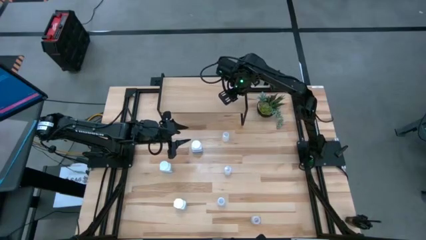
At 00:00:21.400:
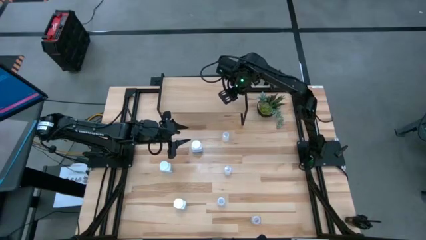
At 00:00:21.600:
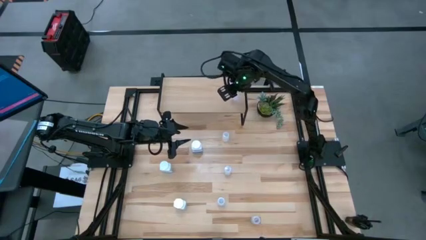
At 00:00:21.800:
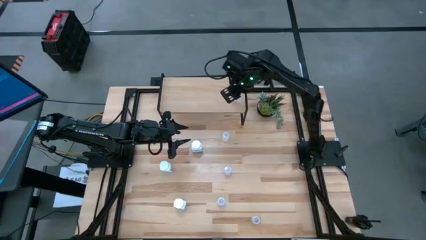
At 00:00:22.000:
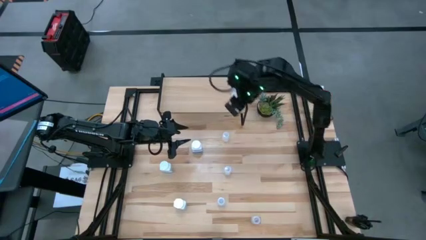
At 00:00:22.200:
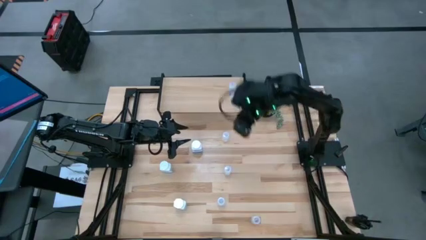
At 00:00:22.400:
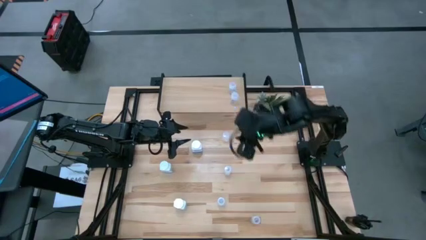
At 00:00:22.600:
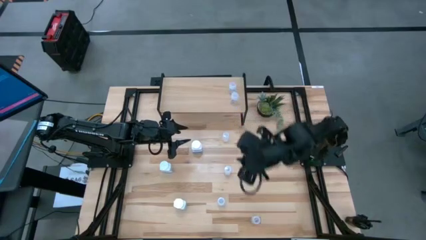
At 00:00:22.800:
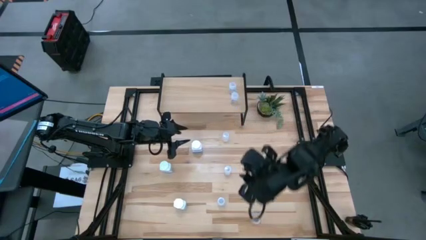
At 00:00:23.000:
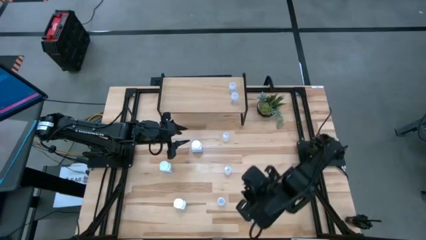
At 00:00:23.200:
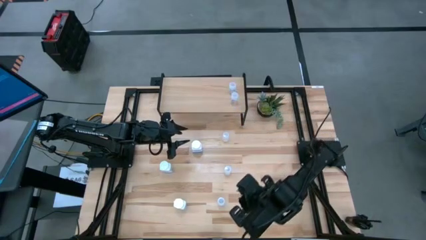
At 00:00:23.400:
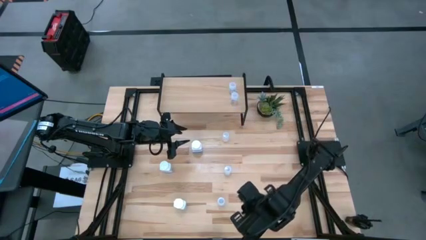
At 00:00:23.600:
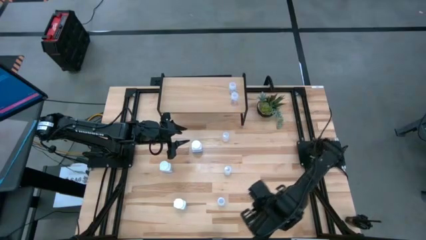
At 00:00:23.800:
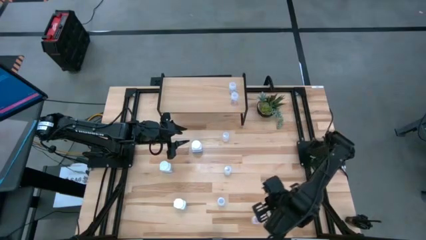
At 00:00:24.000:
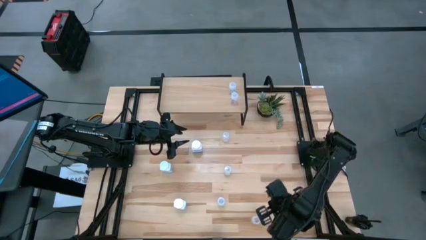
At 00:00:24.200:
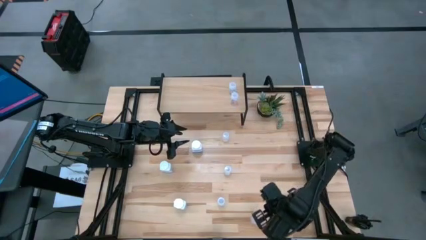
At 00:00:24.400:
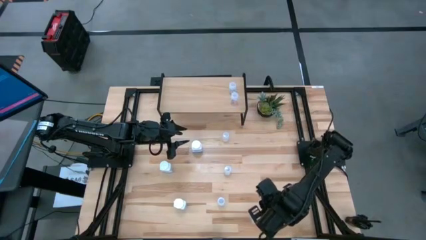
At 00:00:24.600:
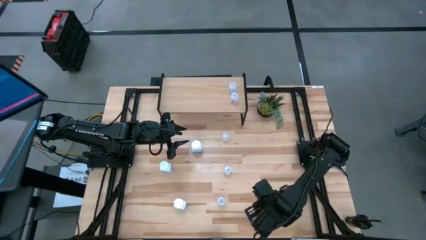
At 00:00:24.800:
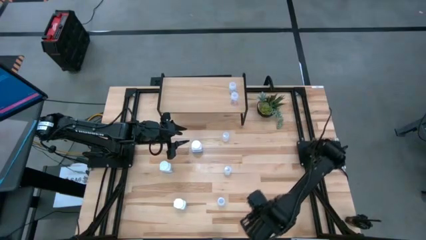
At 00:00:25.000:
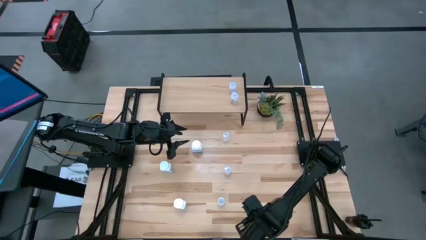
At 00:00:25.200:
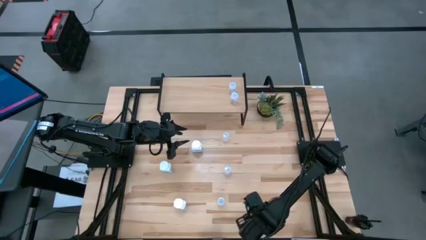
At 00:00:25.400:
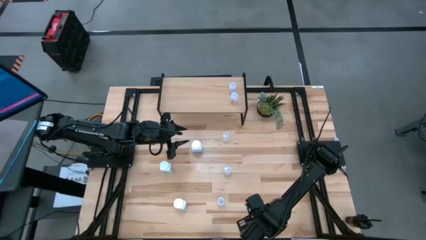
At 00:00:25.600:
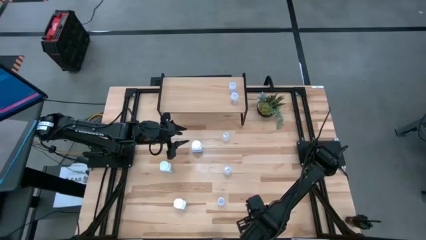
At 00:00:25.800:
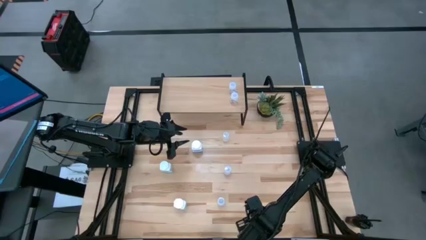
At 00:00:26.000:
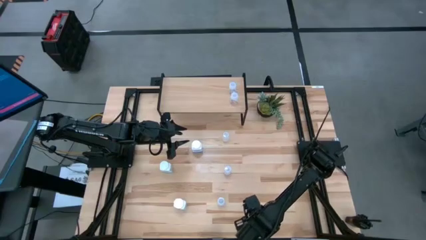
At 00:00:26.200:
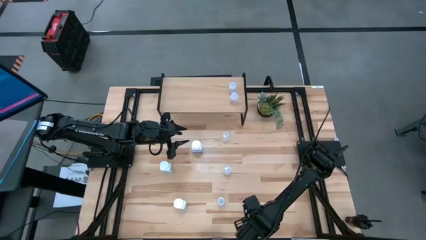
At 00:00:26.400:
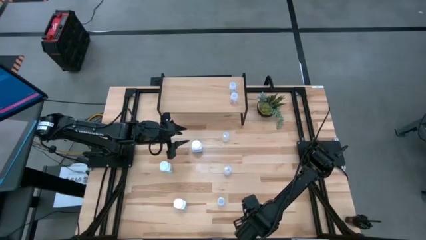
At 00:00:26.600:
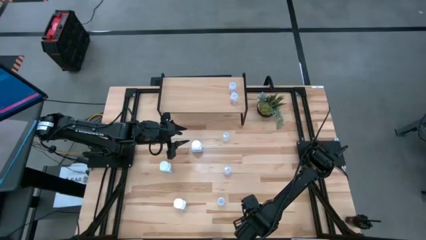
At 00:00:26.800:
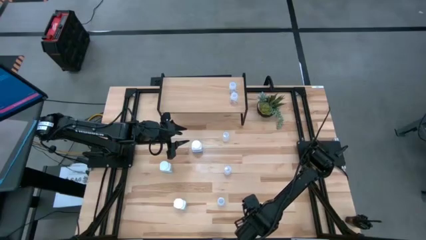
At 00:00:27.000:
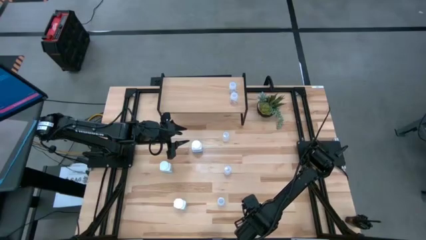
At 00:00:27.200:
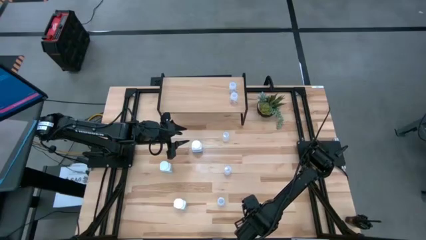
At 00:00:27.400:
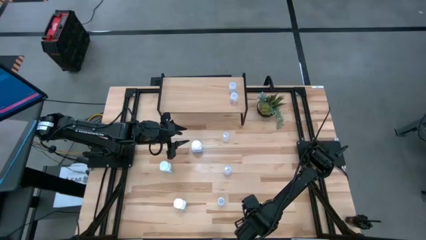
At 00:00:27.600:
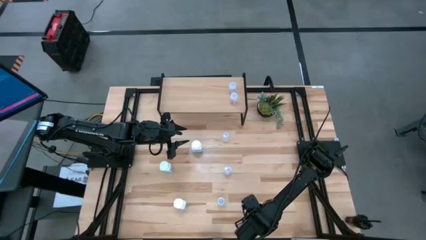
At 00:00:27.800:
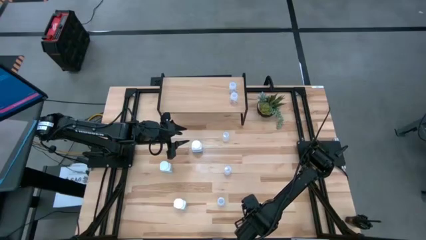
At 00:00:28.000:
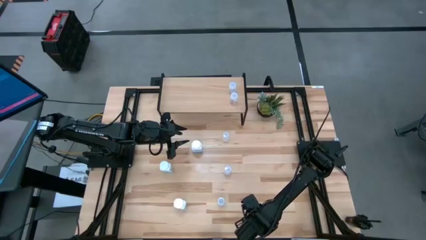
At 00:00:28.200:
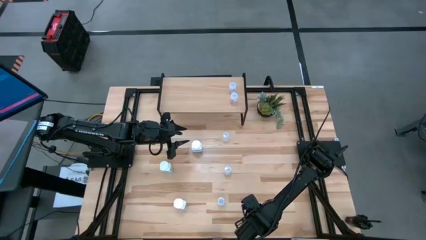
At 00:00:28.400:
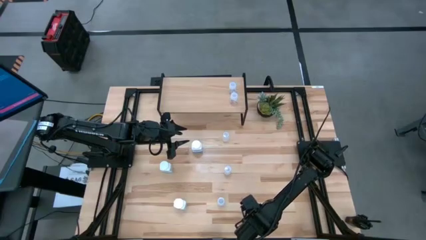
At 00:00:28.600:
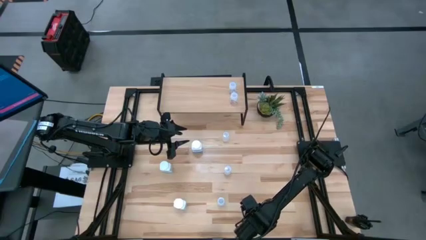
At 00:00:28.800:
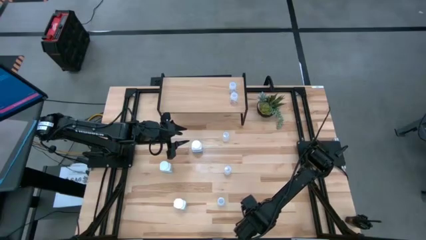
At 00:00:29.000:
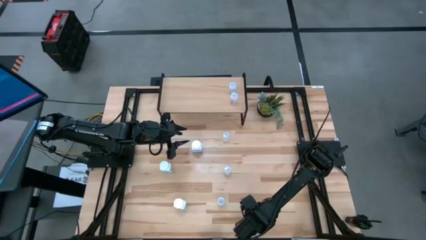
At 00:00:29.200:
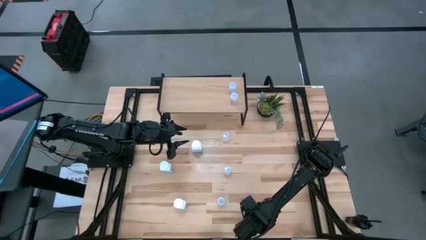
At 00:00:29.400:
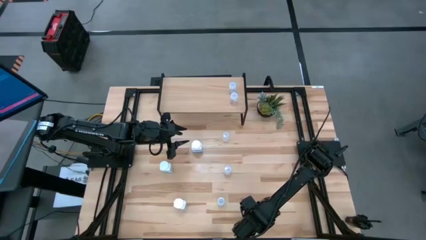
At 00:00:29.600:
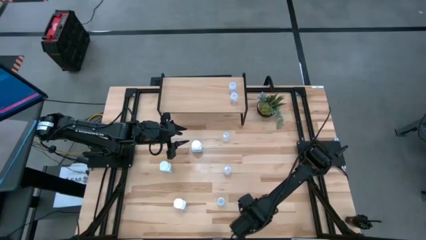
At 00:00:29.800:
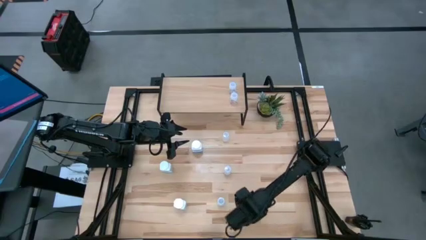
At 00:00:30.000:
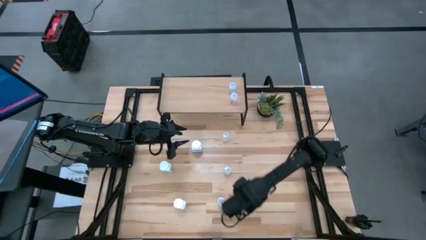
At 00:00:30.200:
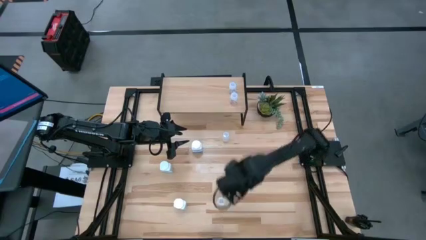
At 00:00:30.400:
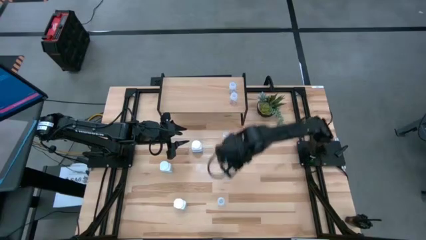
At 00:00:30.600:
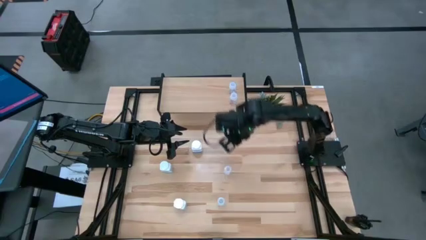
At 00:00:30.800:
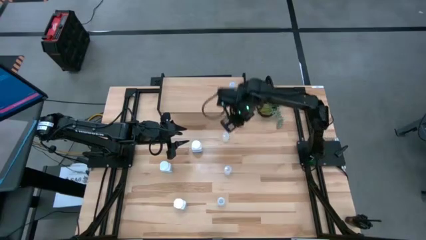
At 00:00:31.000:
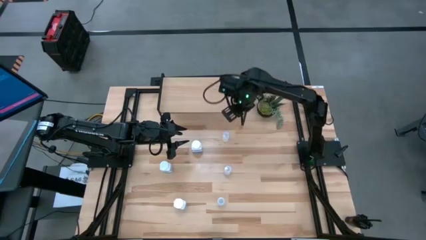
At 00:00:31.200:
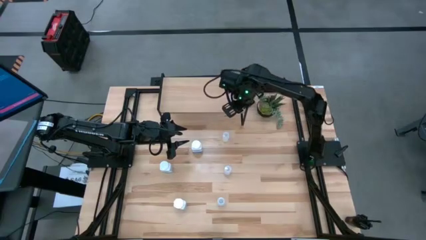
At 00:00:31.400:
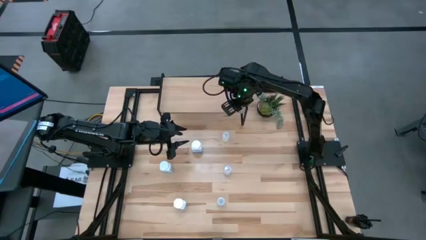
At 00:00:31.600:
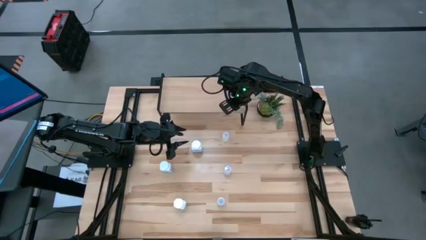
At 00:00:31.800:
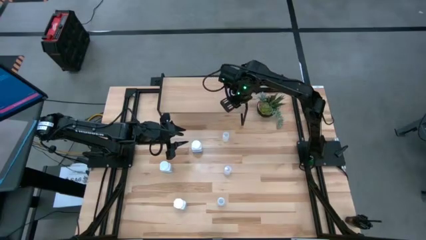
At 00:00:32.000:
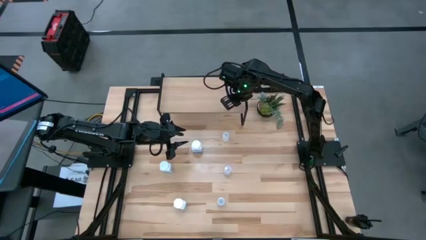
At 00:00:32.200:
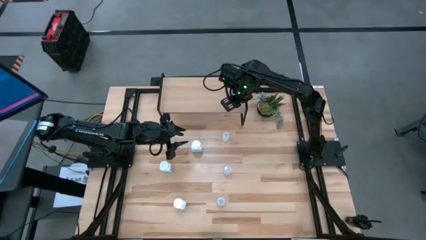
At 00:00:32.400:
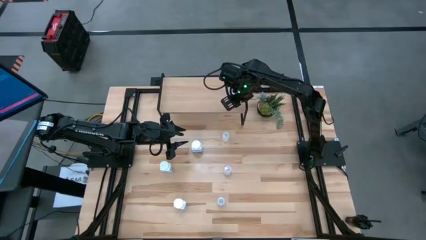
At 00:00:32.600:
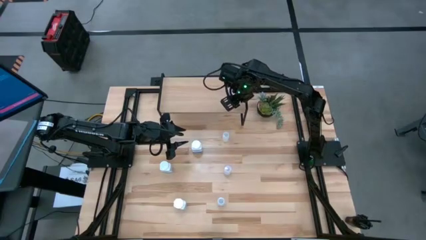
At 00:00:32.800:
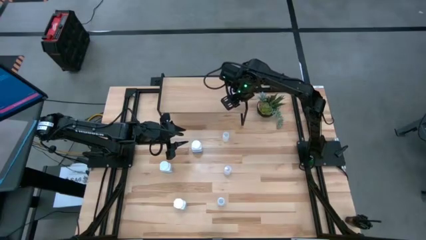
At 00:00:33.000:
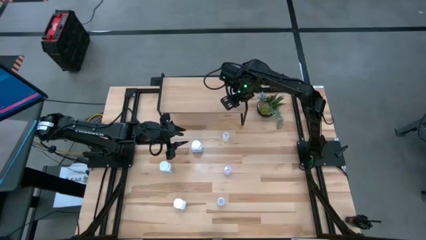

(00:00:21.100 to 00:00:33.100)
Task: Pick and place medicine bottles onto shelf by color
Put the transparent pill bottle on the shelf aligned with the other transparent pill bottles

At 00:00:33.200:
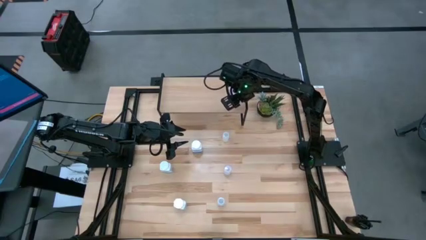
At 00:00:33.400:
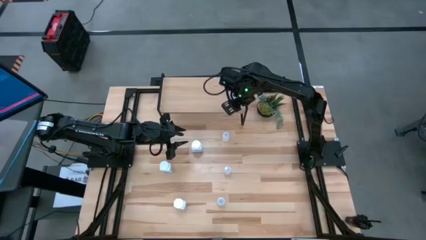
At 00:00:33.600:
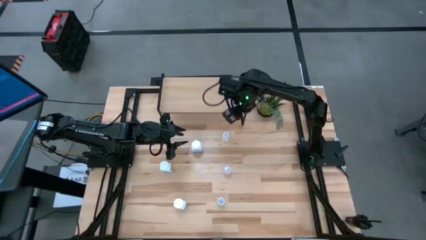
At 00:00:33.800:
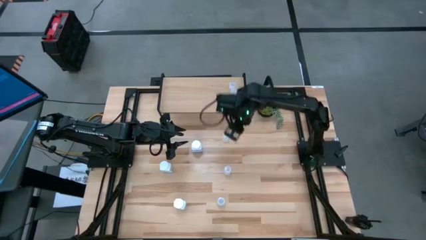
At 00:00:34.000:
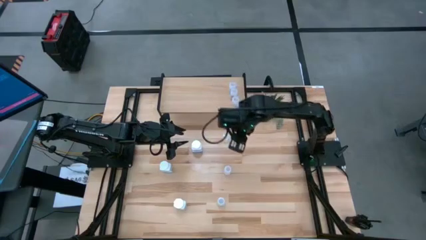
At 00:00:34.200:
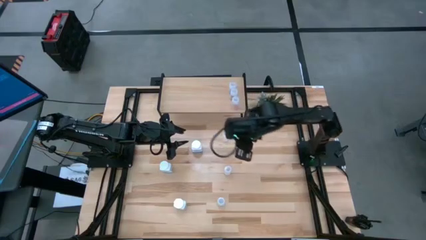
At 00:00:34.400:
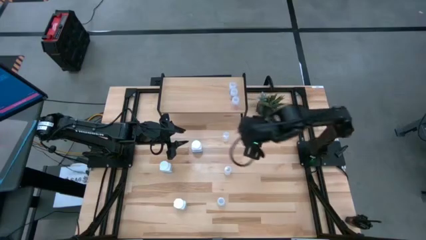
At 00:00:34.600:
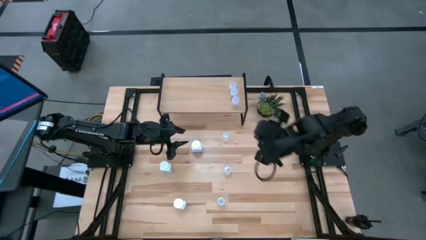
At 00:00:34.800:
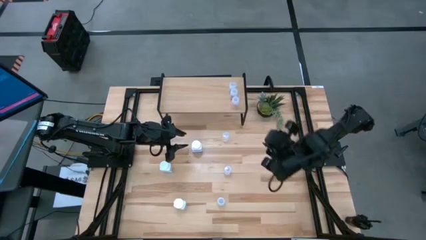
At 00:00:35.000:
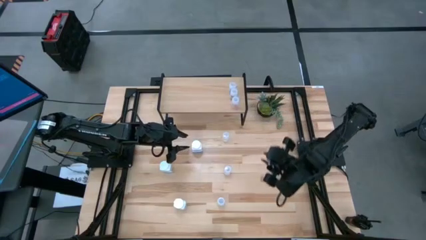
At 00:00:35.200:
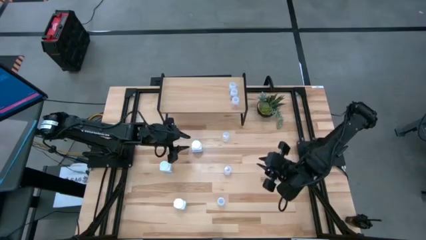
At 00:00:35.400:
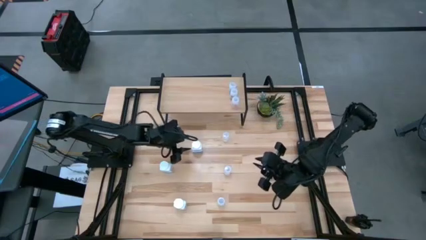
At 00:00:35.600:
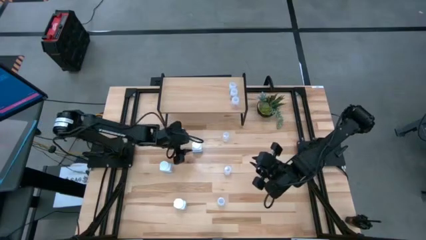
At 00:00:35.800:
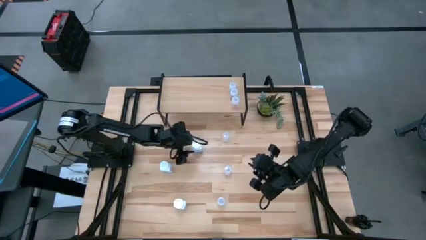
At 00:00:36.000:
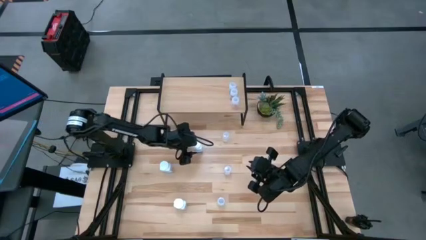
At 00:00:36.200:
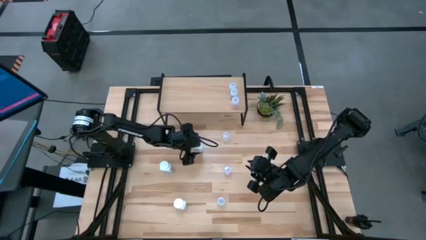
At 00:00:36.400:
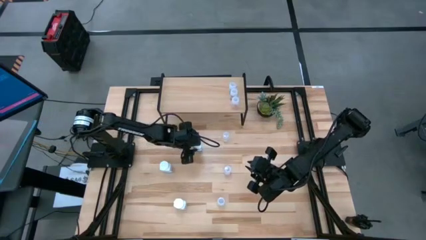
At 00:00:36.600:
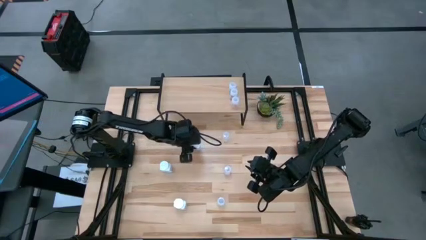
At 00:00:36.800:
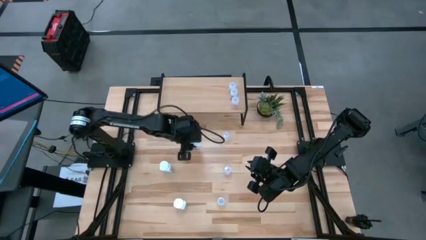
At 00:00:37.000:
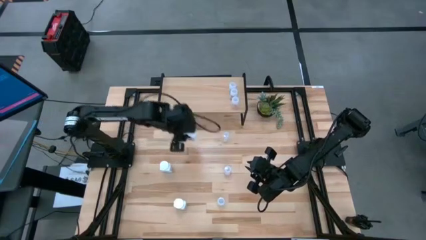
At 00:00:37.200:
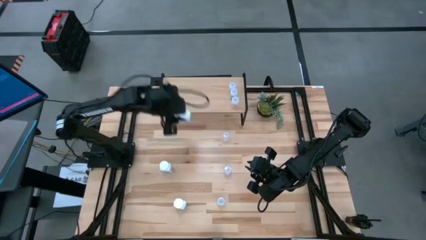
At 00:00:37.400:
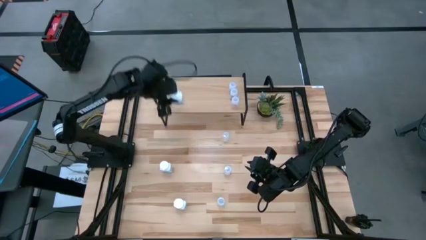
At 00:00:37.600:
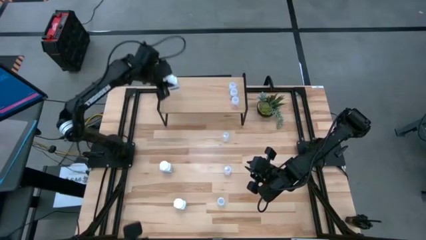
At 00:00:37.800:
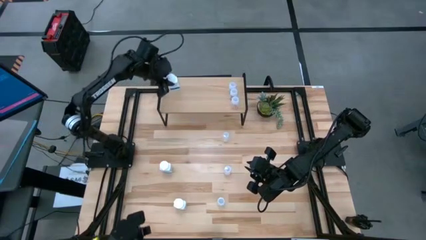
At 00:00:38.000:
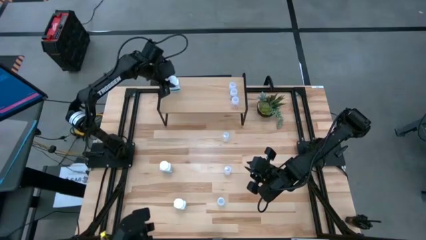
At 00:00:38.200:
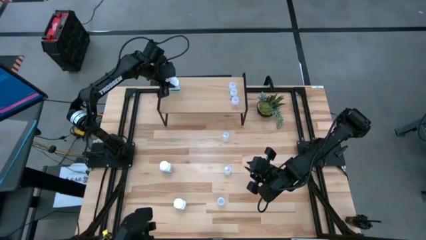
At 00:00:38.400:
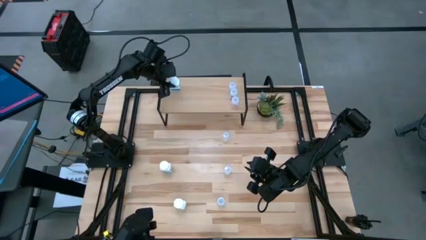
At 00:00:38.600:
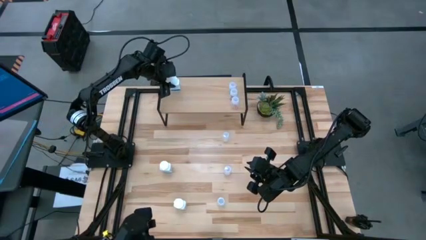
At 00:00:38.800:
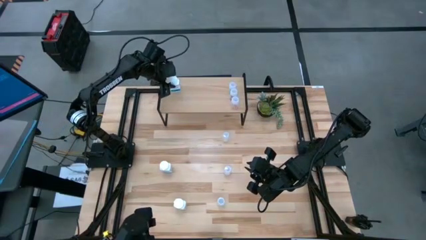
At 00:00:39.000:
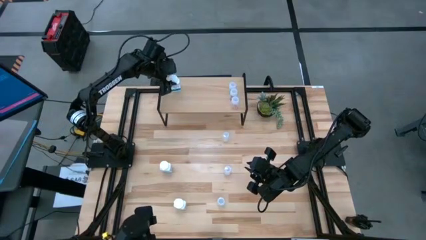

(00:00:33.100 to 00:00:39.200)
Put the white pill bottle on the shelf
